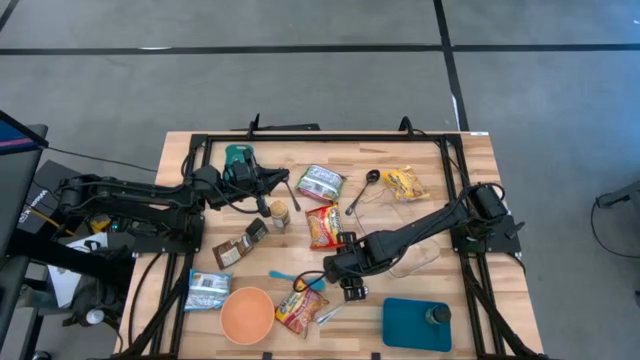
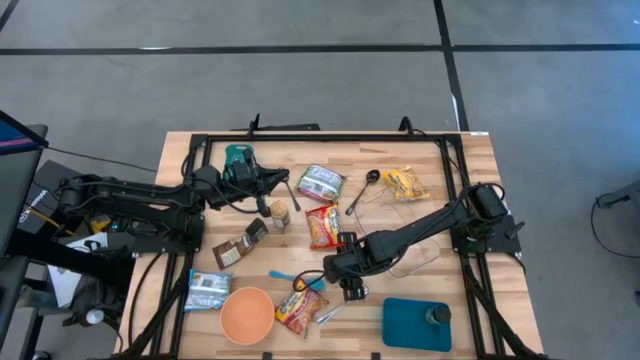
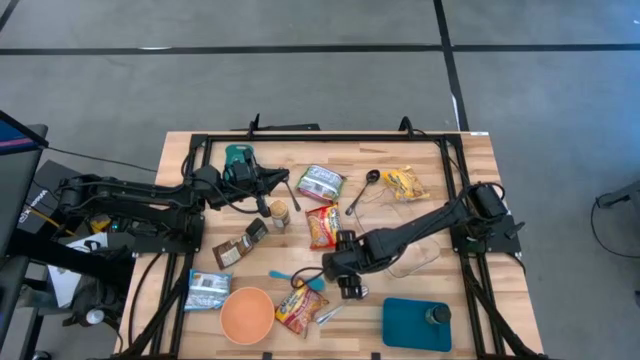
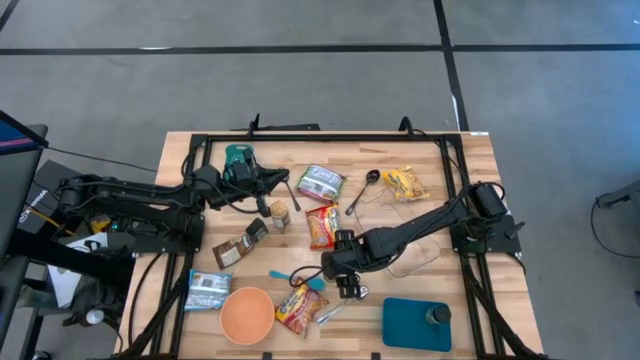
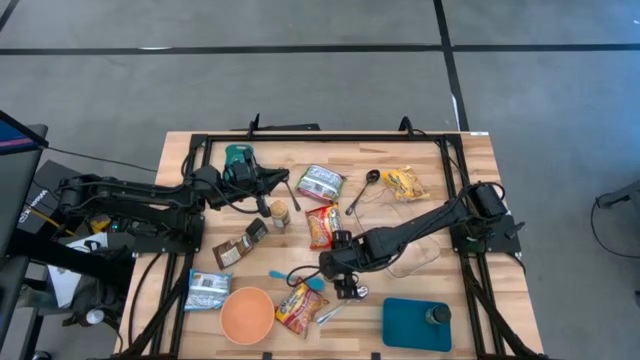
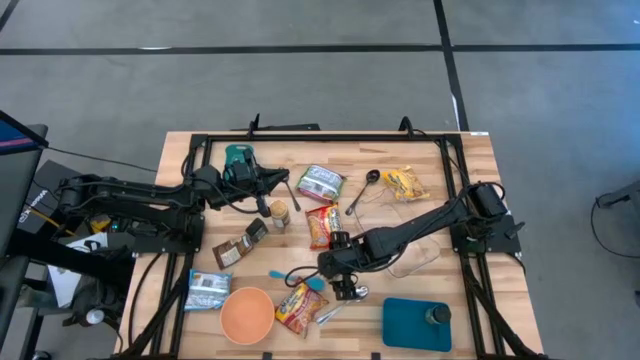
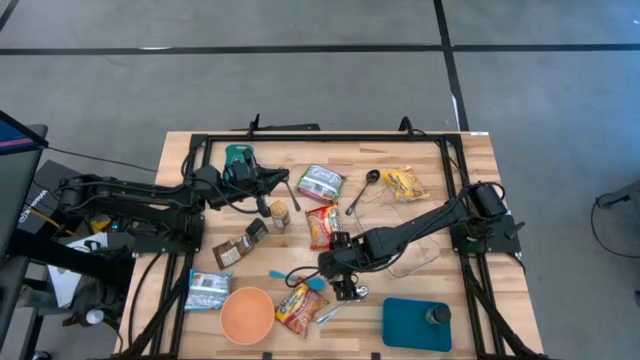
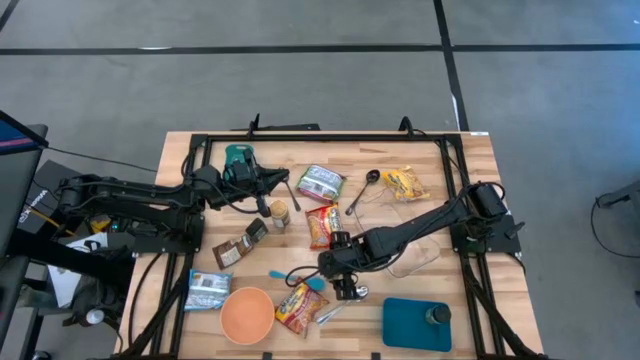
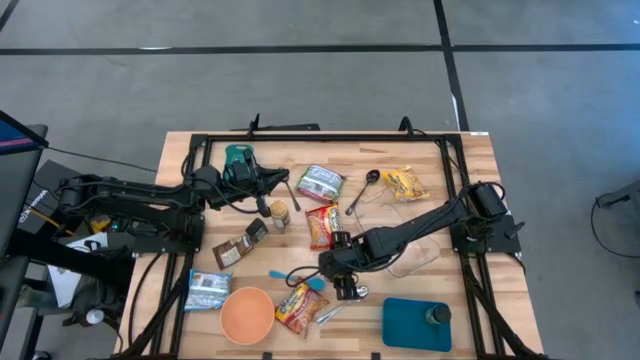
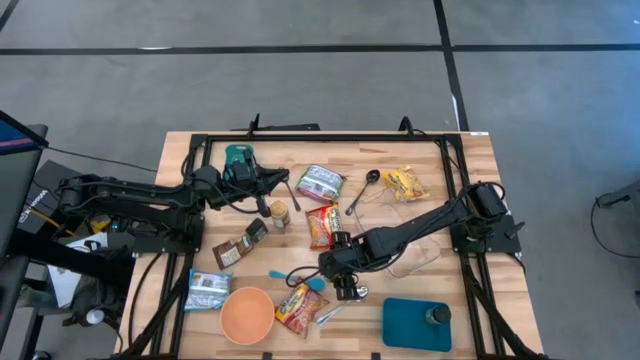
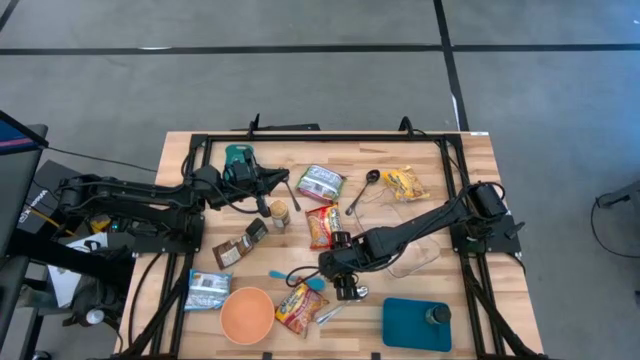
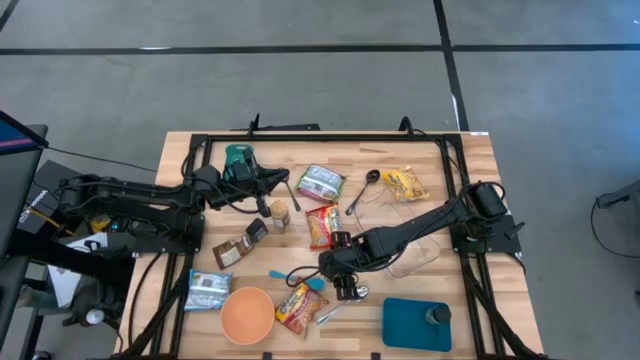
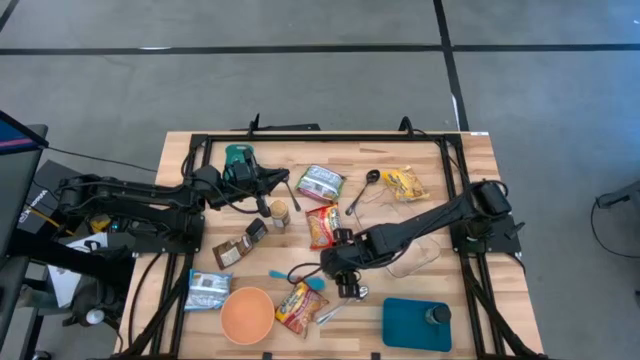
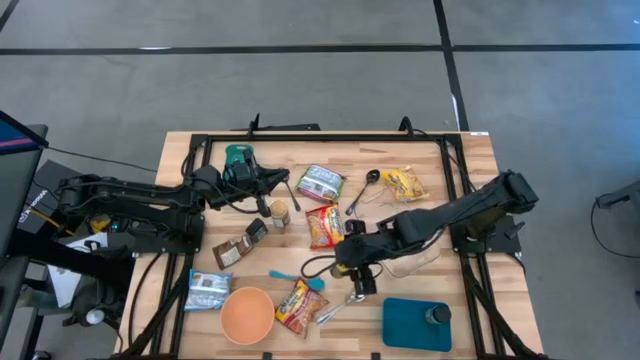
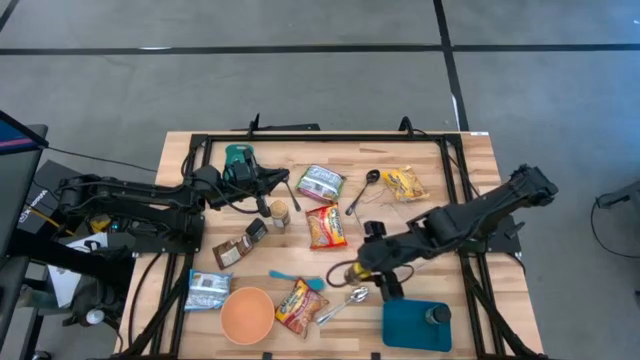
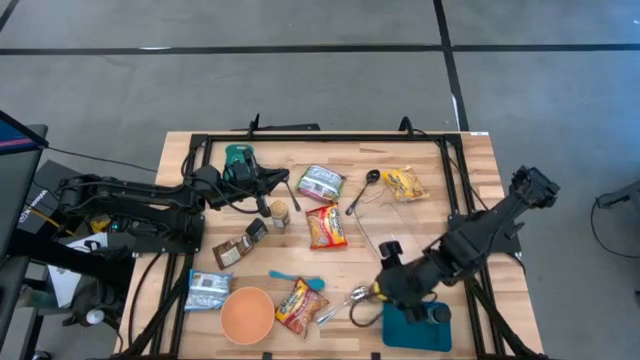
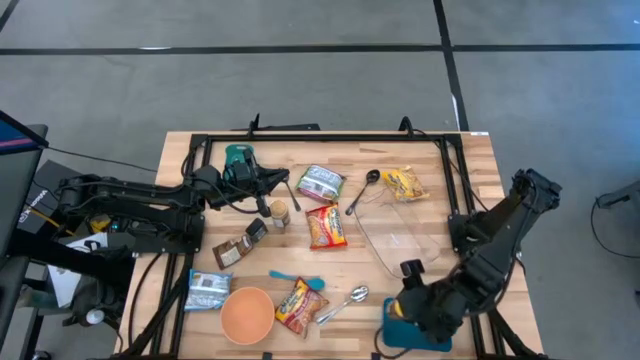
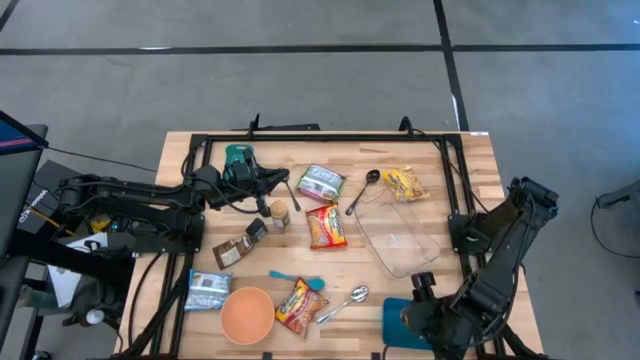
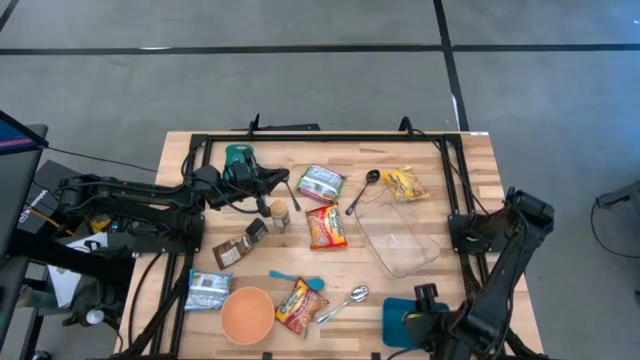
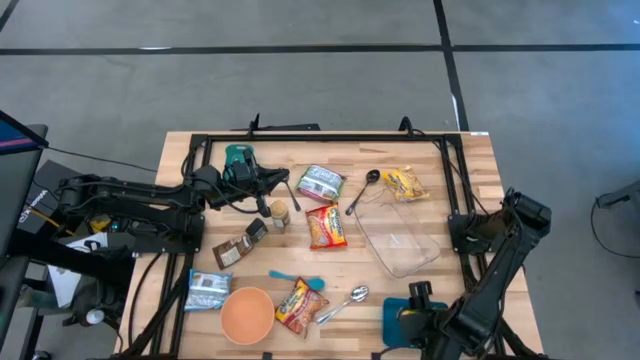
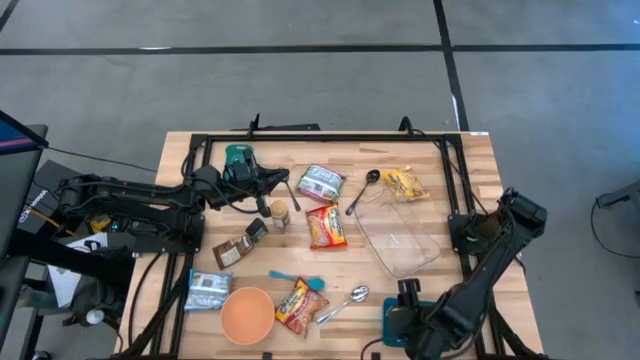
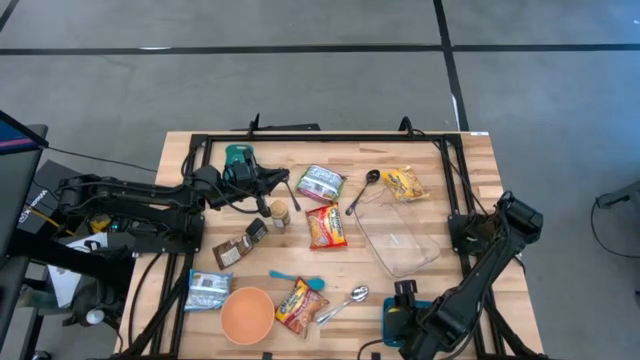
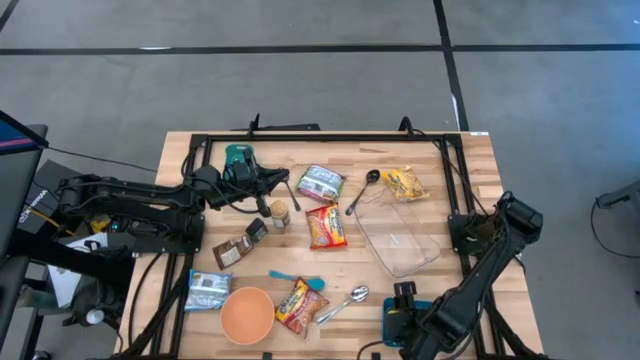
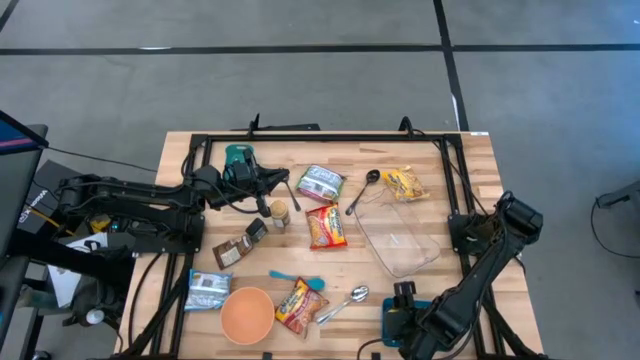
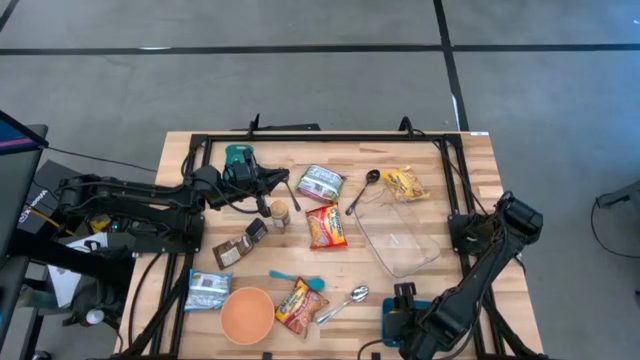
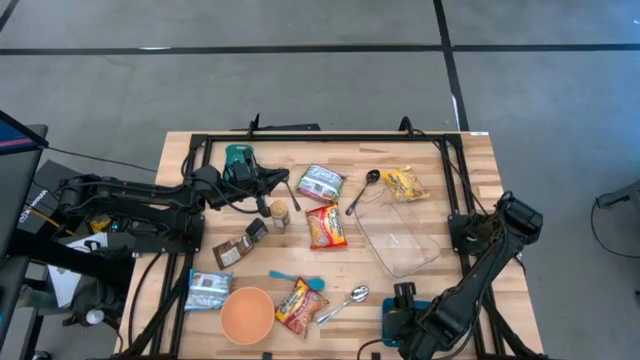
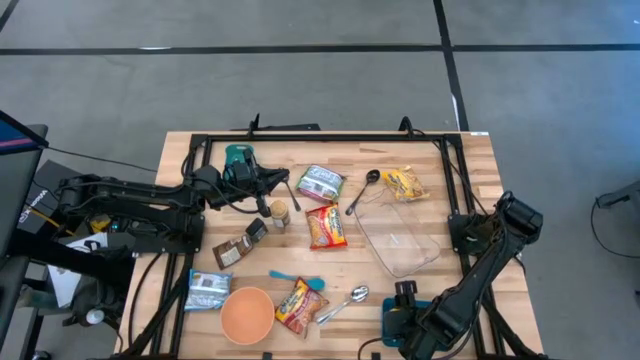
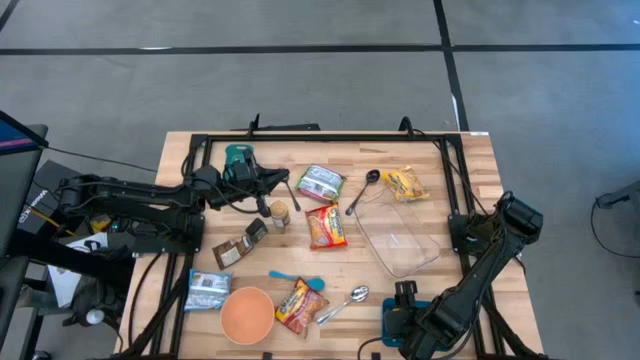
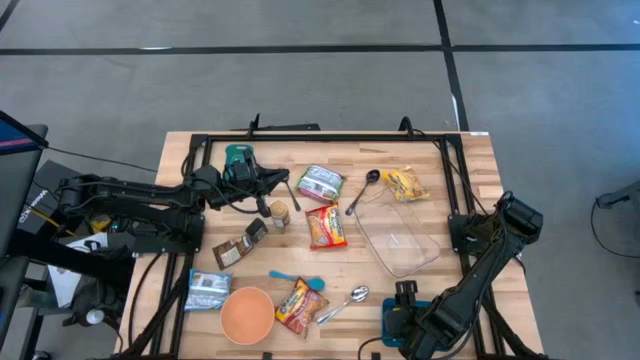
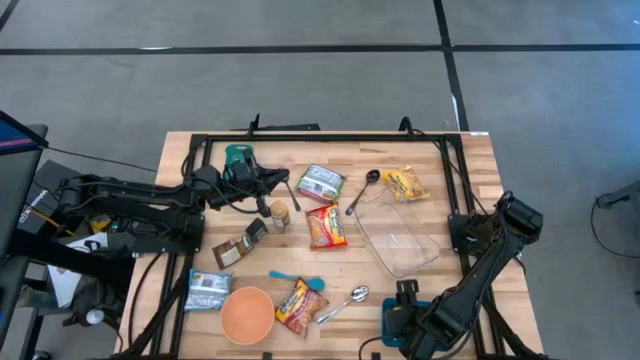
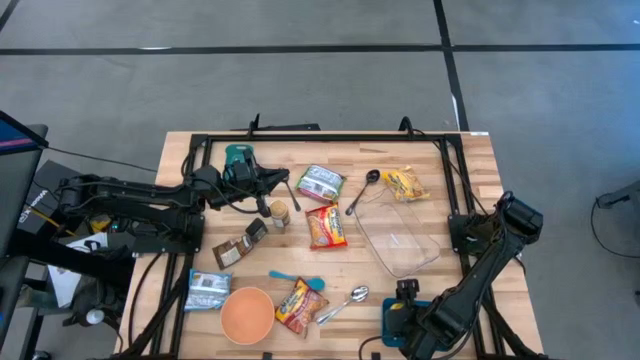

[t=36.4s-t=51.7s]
Task: Pick & Place Food Item
Put the yellow spice bottle into the blue bin

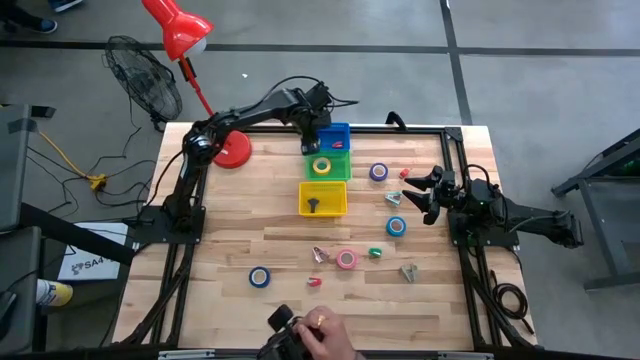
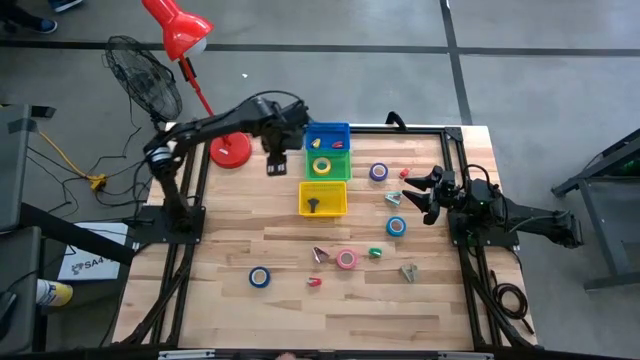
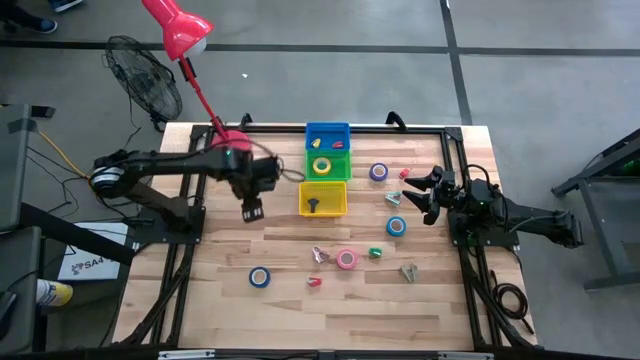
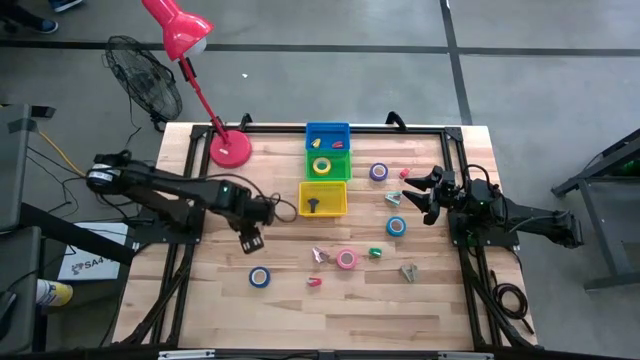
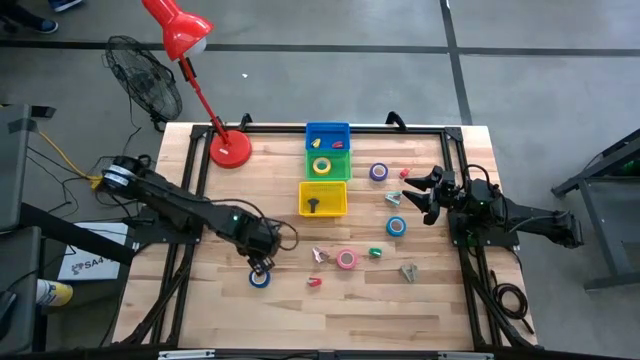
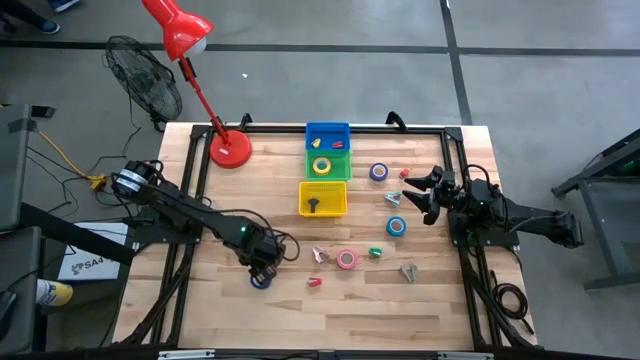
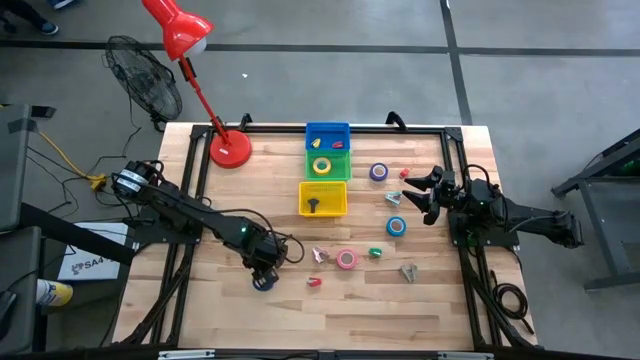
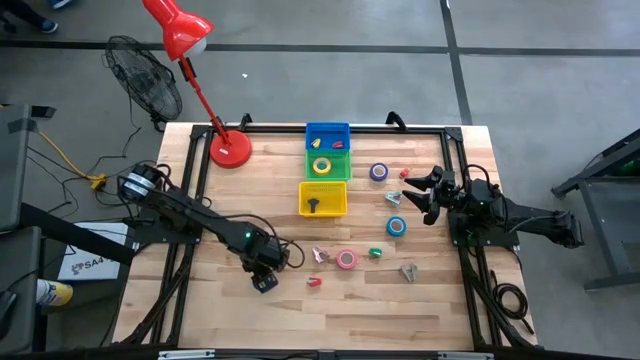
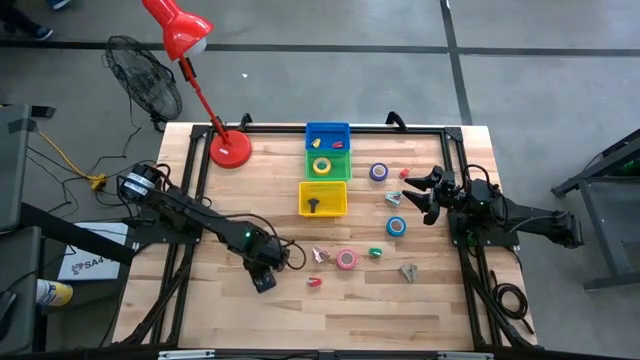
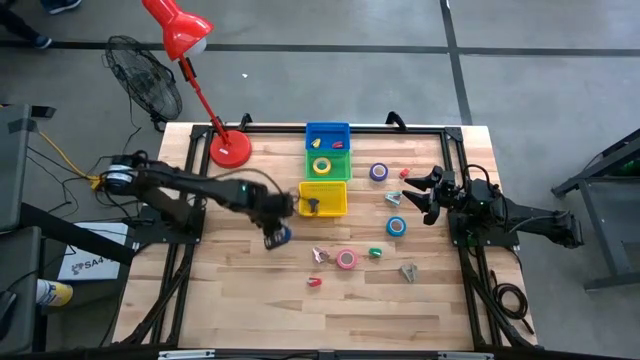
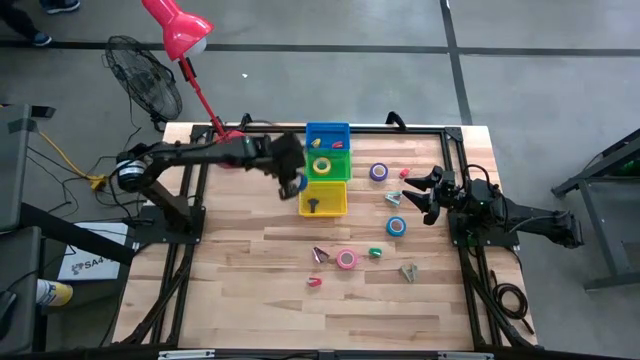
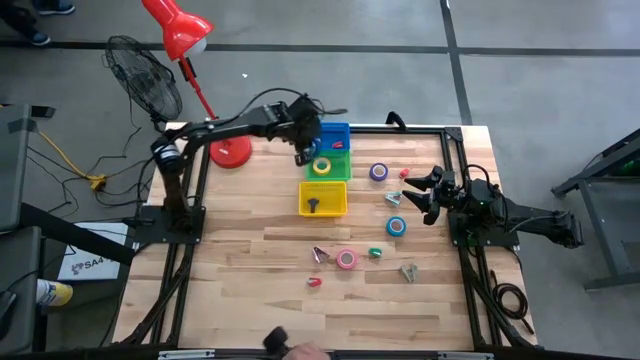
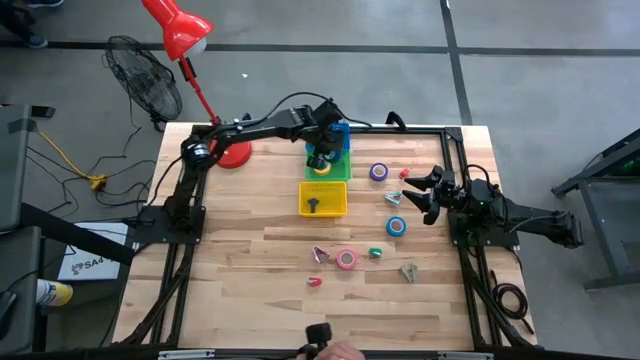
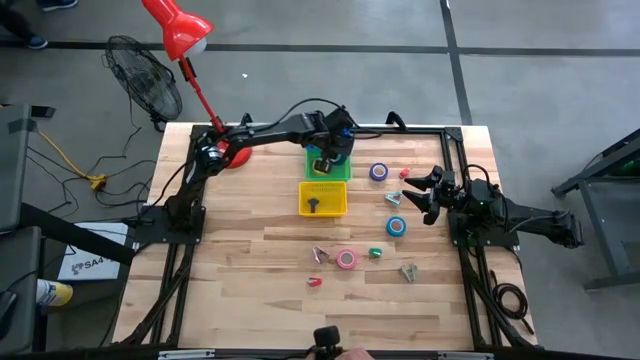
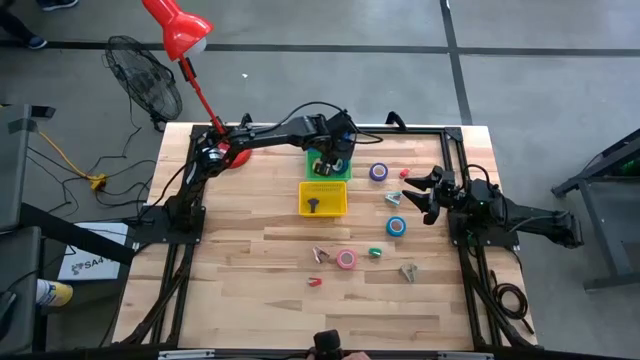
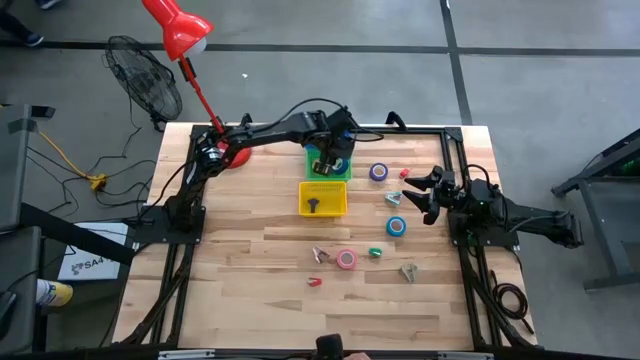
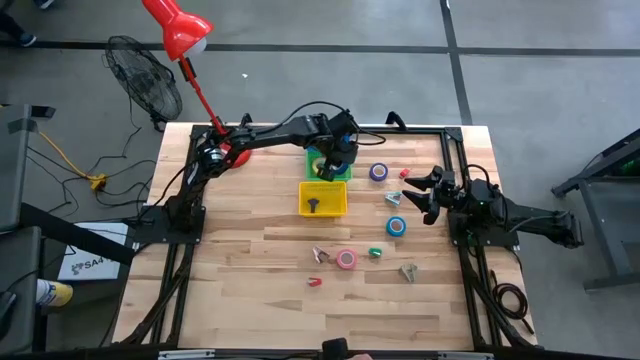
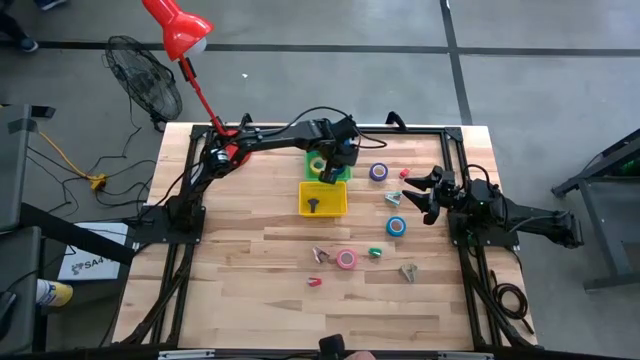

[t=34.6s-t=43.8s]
Task: Pick and place Stapler, Stapler remover, tape
Put the bottom blue tape into the green bin
